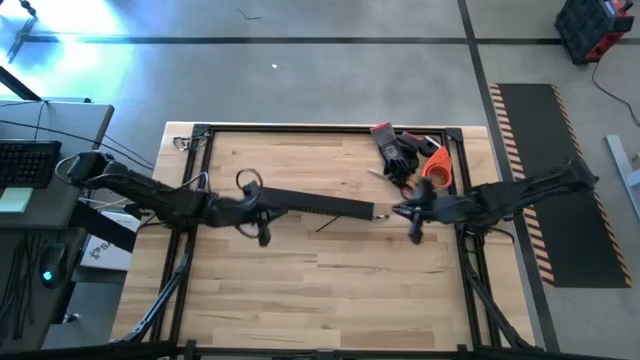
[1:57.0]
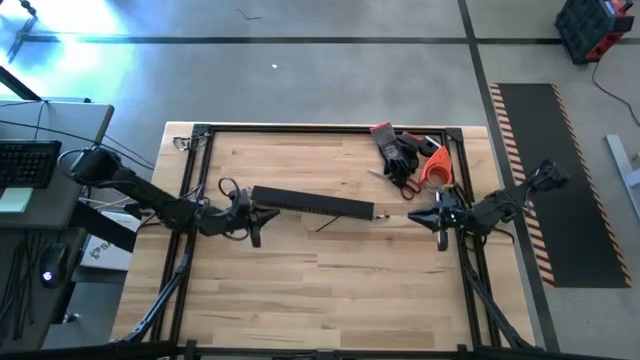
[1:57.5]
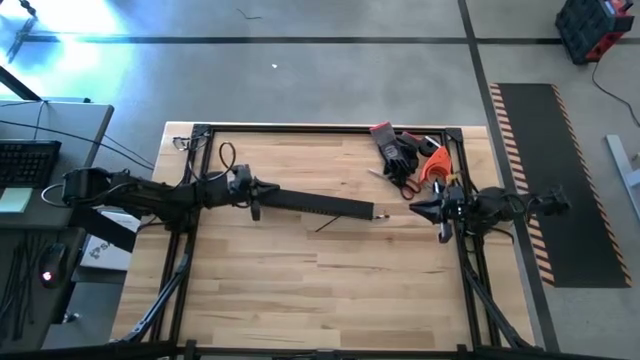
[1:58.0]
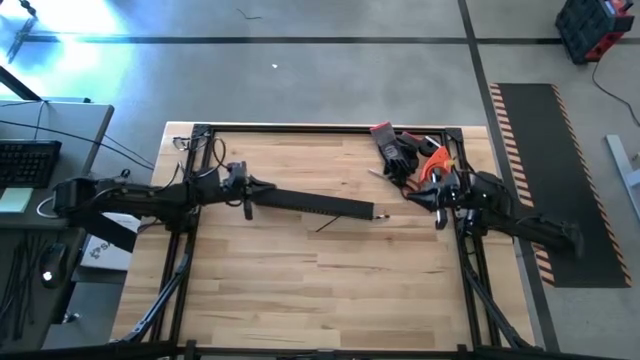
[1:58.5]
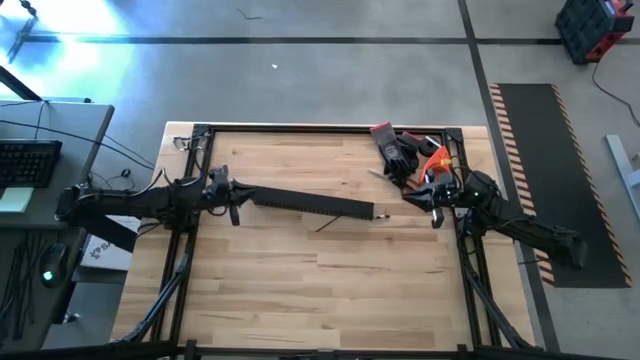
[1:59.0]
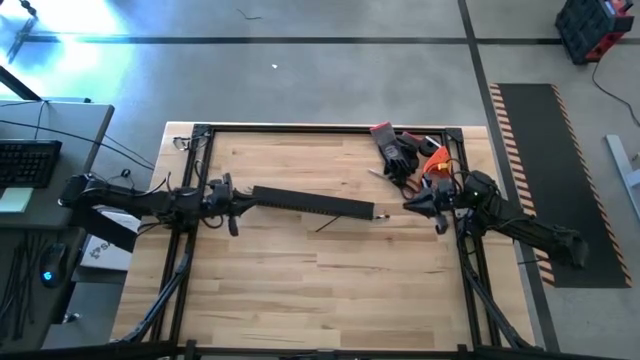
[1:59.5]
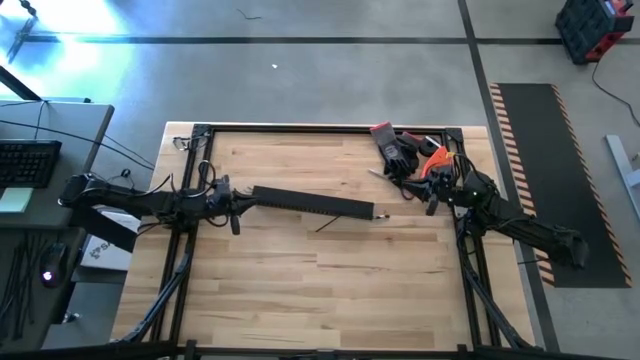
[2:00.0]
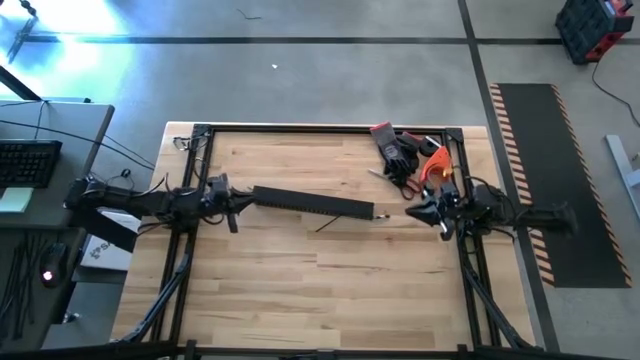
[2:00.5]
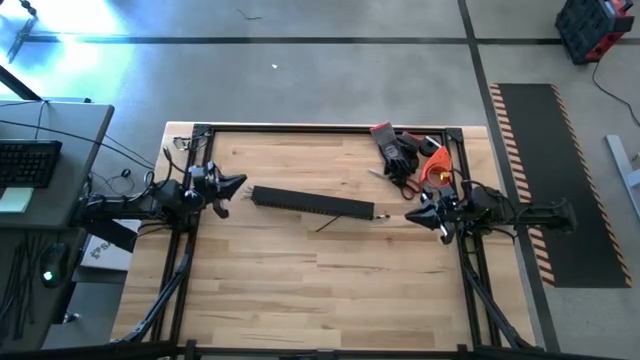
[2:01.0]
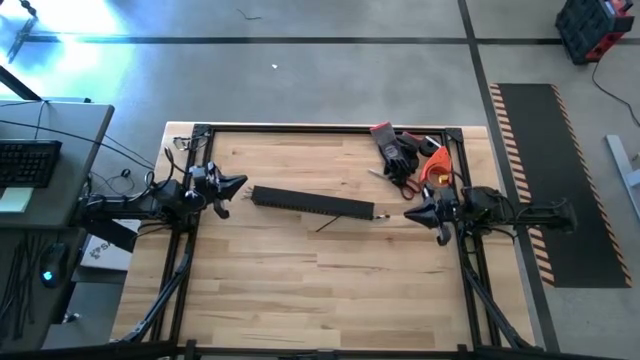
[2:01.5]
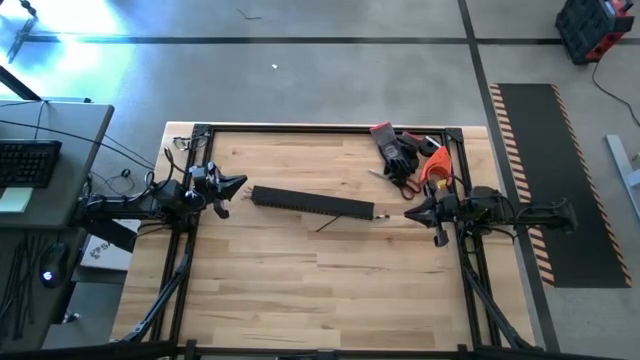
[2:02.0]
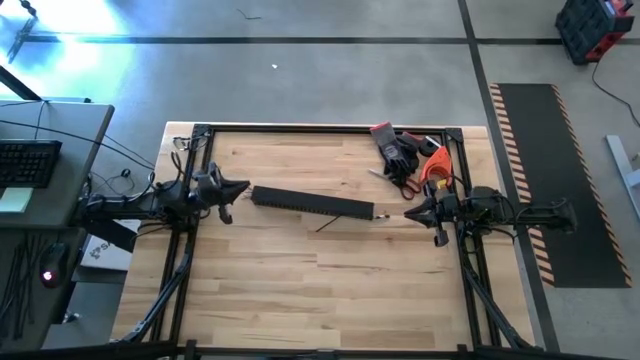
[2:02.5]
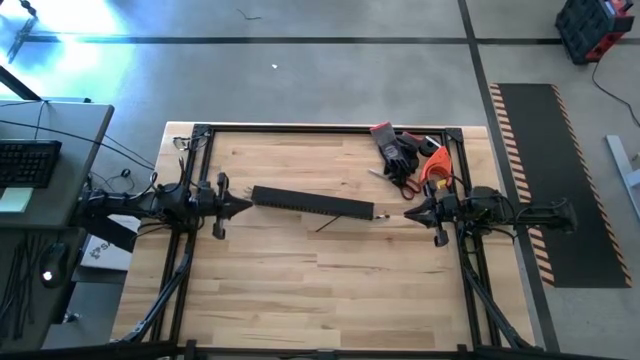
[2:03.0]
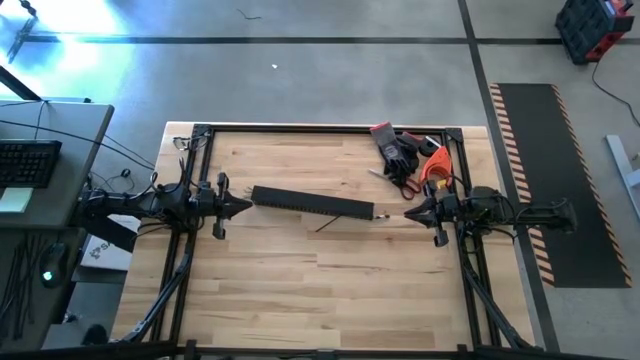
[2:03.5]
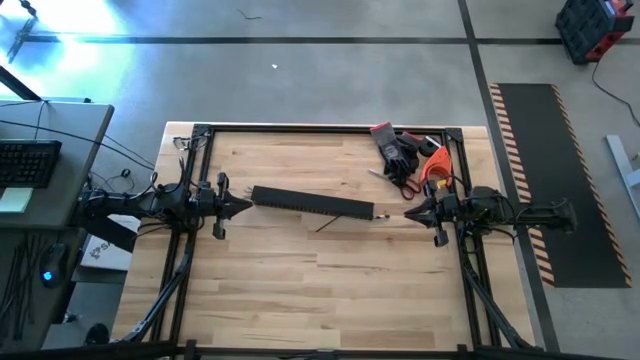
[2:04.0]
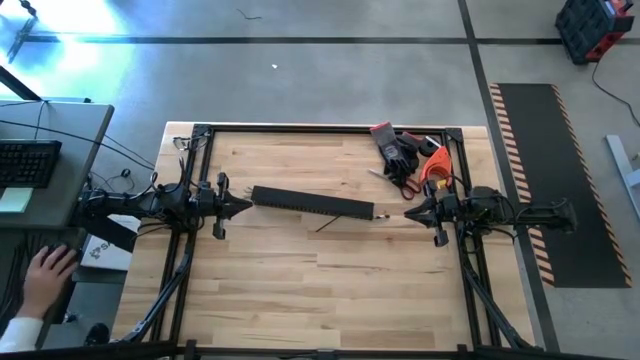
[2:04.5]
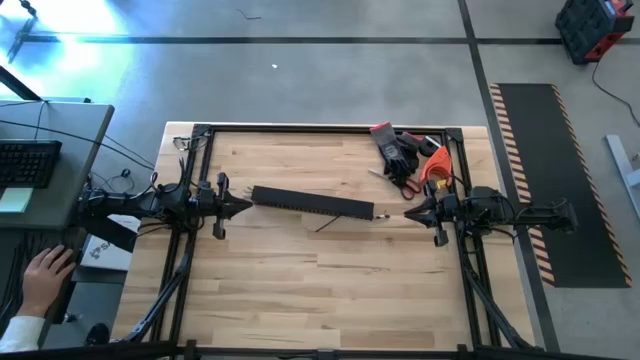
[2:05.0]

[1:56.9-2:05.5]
Task: Ziptie cables
Return to Home Position

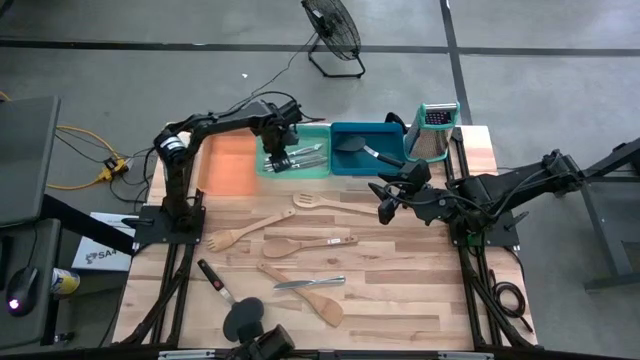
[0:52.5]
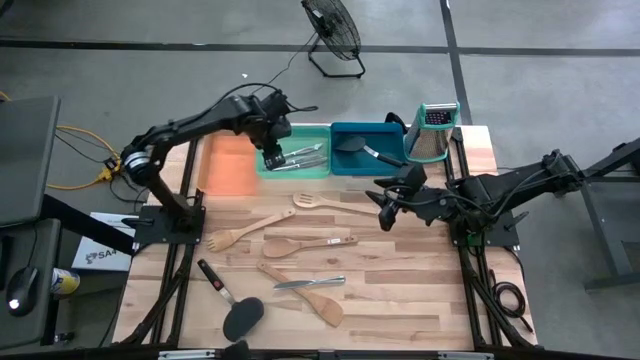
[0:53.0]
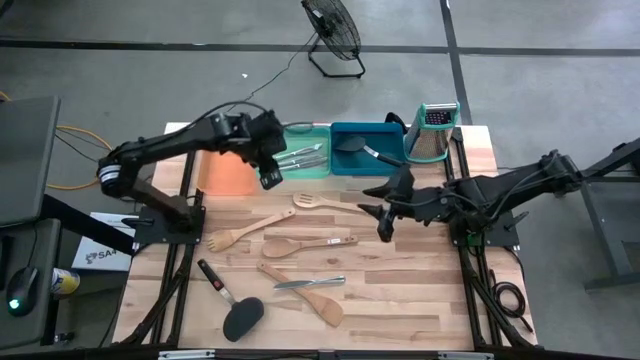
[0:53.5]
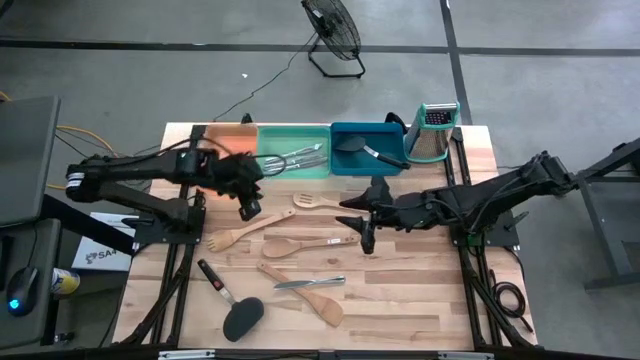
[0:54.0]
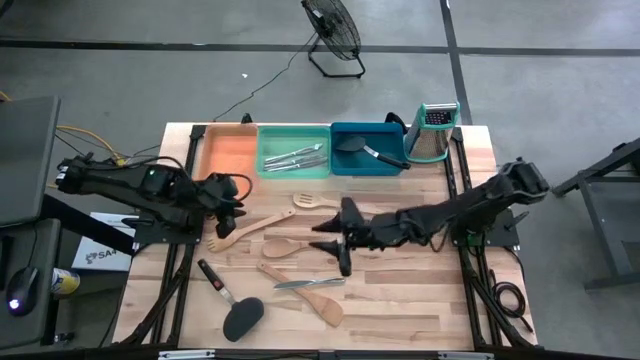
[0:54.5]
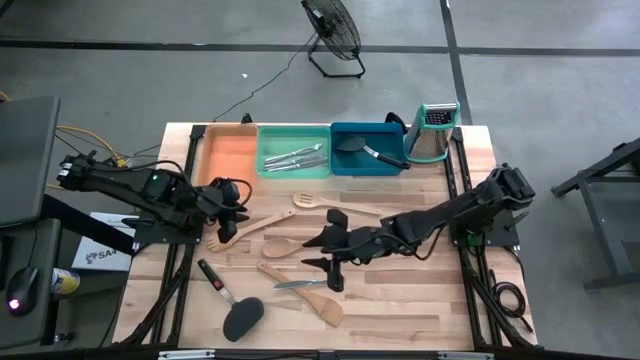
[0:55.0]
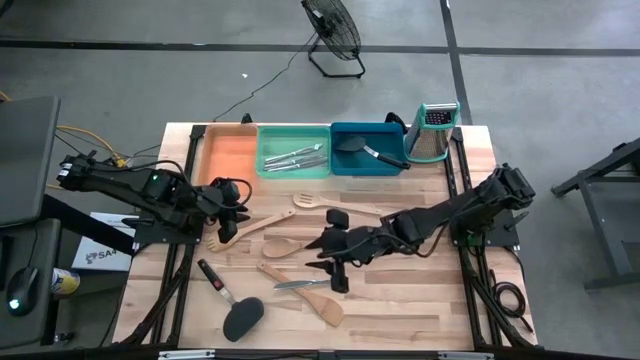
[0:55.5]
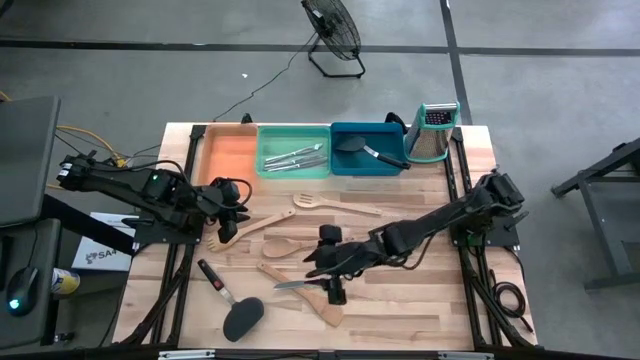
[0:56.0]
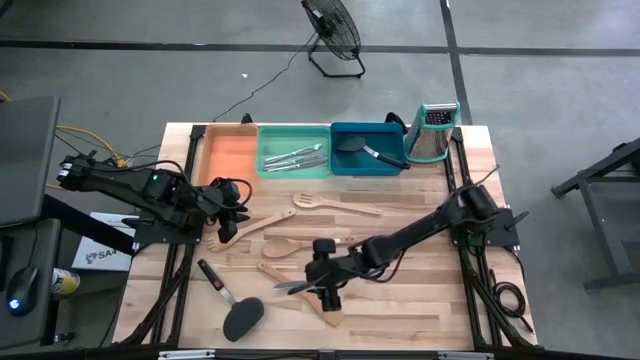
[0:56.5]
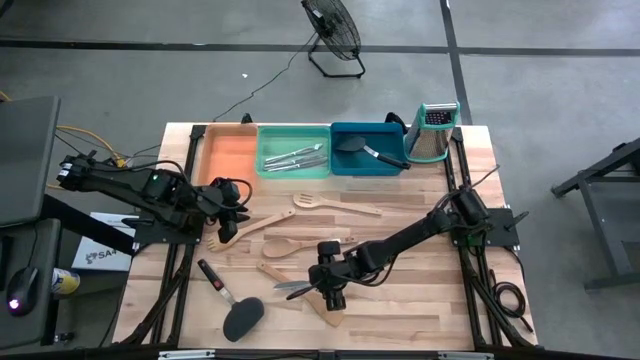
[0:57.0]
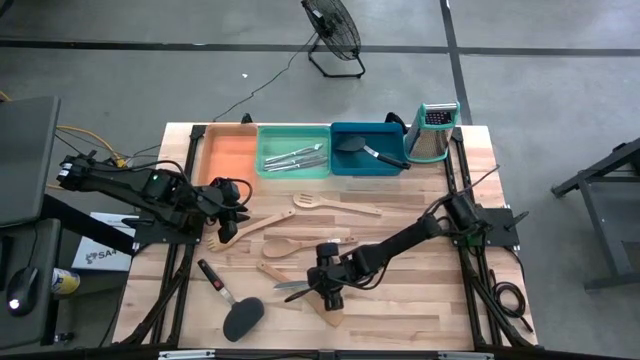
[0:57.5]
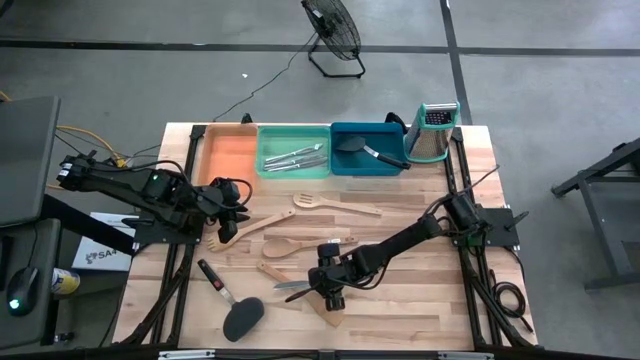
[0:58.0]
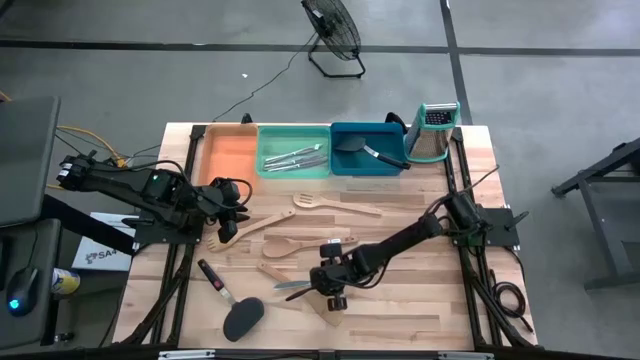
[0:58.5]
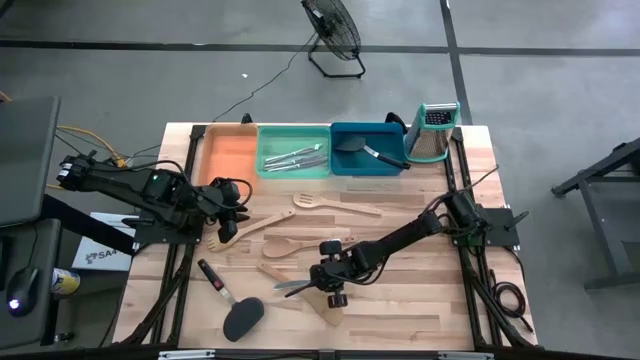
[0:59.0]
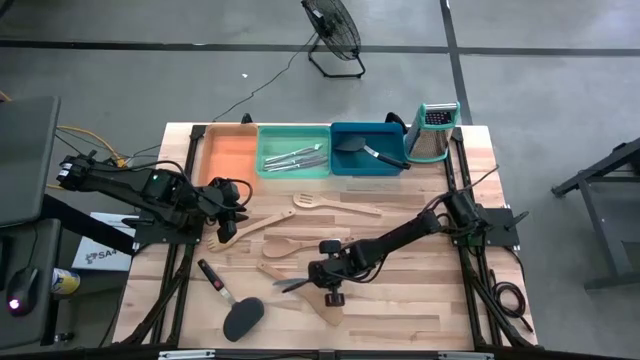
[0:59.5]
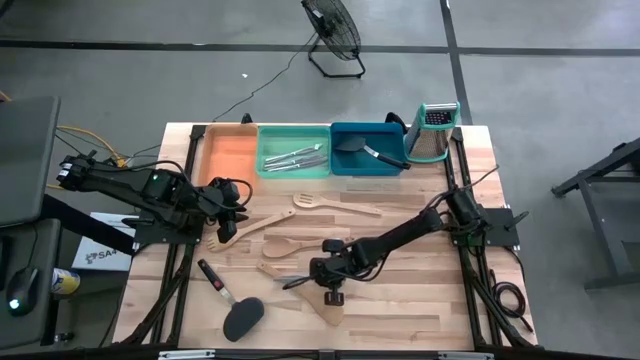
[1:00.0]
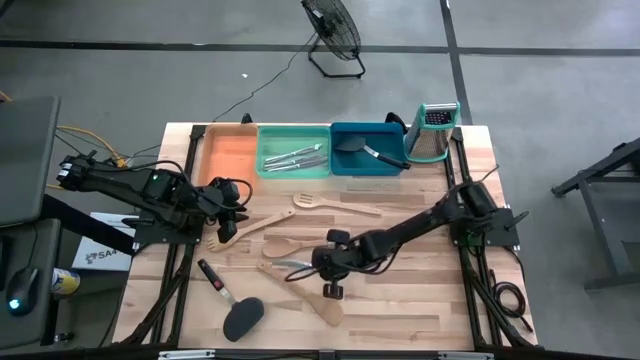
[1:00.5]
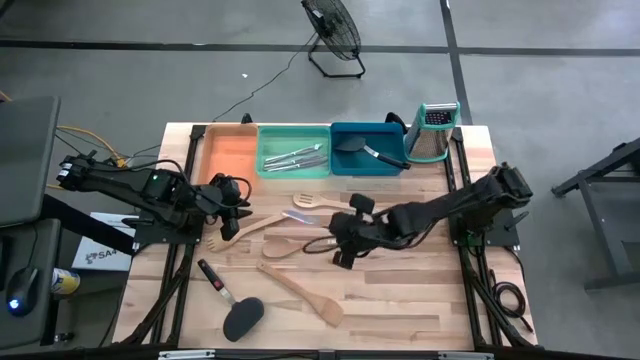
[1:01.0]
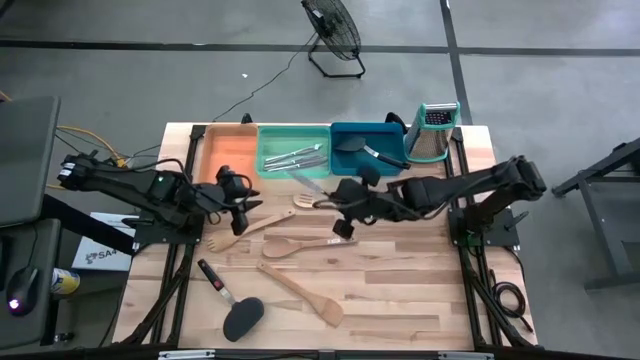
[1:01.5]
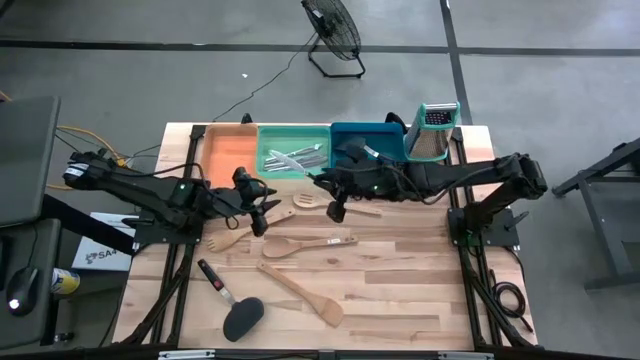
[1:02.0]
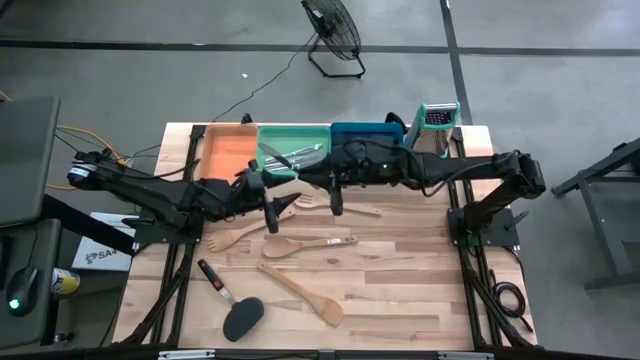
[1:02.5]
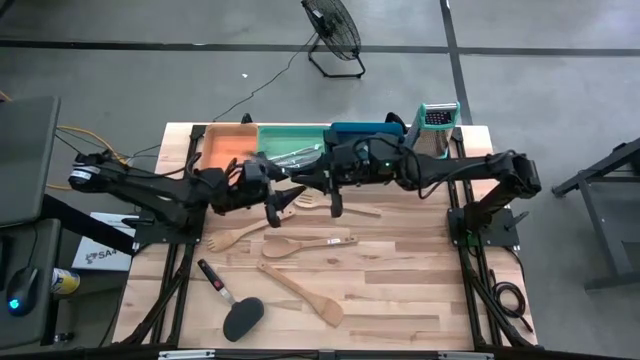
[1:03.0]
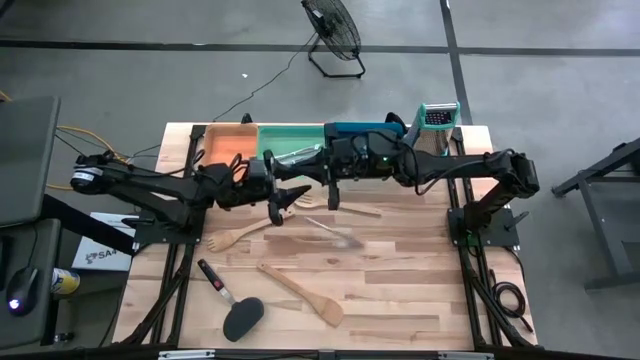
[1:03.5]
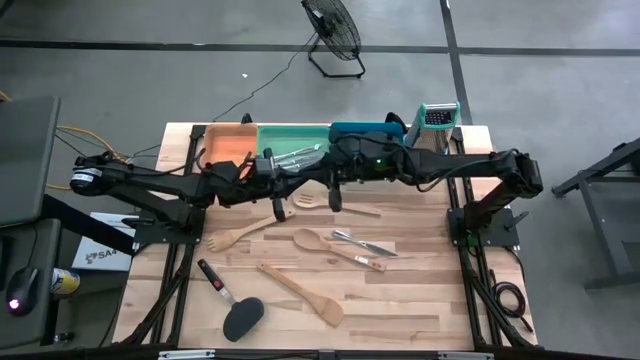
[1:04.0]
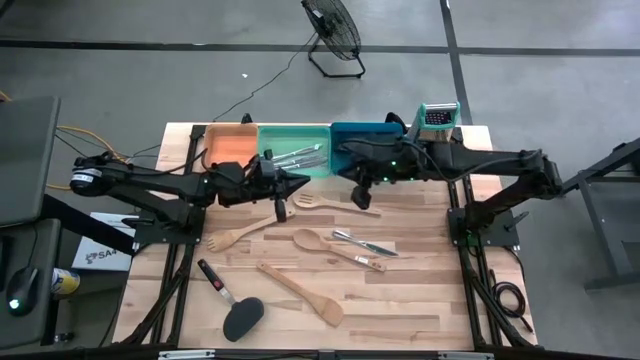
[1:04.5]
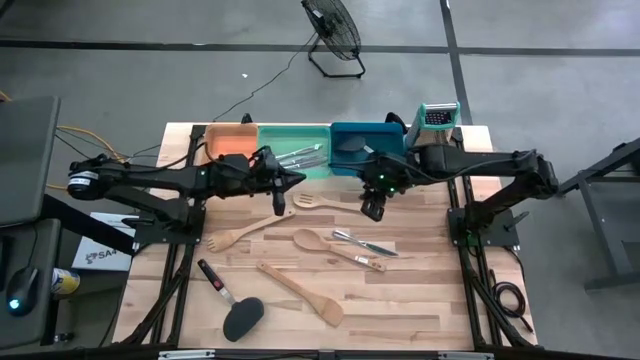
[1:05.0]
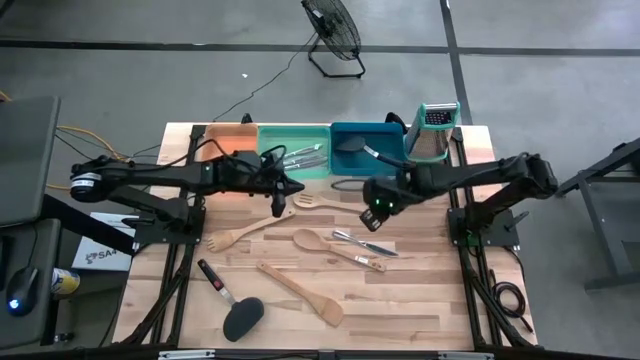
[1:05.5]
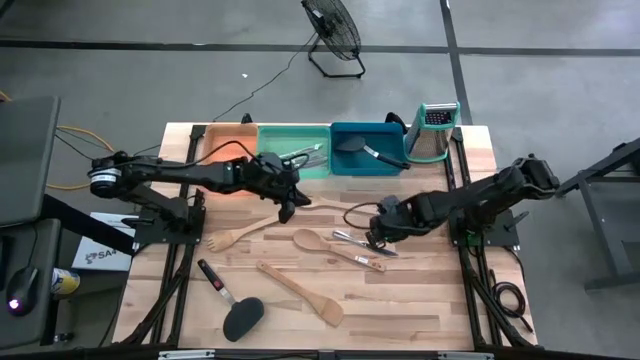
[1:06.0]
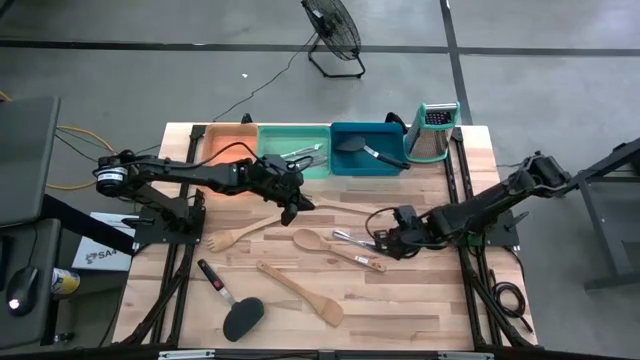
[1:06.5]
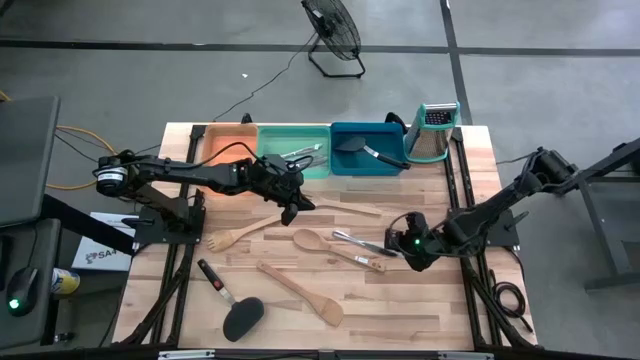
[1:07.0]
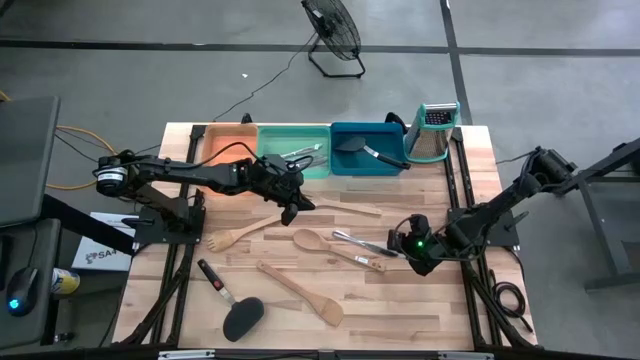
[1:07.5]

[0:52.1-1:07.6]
Task: Pick & Place Kitchen Items
Put the silver table knife into the green bin
